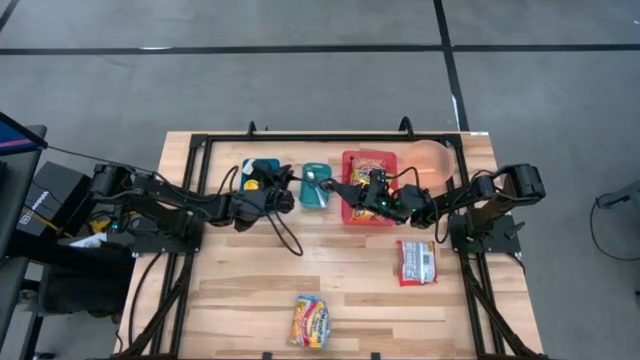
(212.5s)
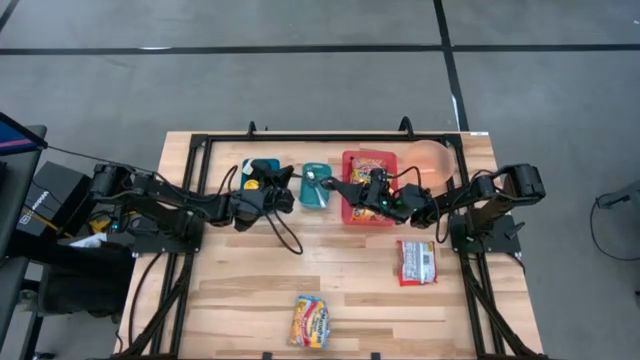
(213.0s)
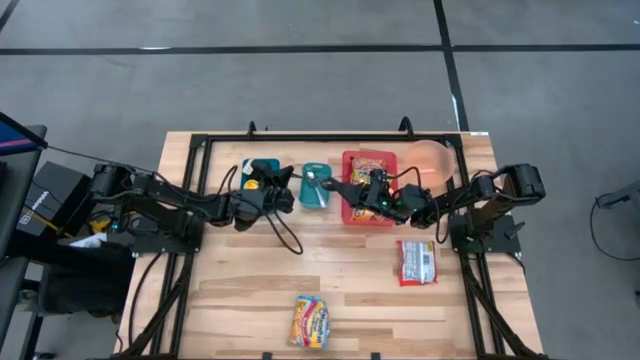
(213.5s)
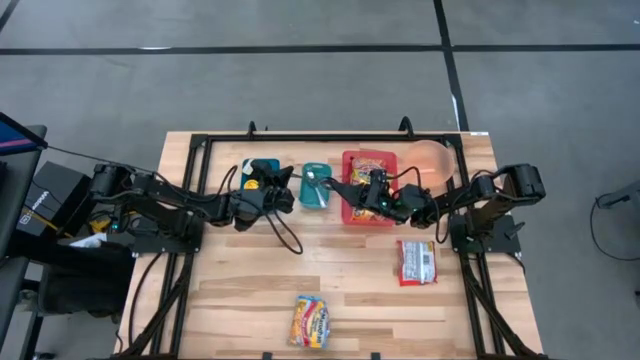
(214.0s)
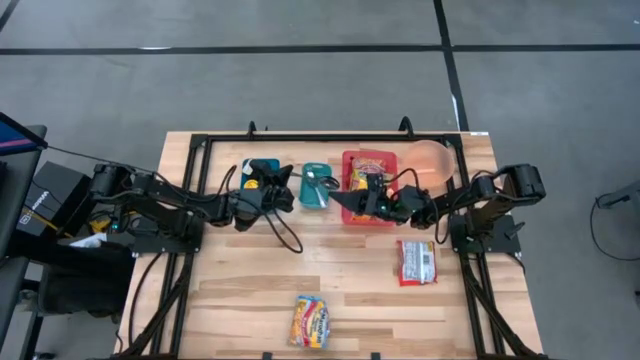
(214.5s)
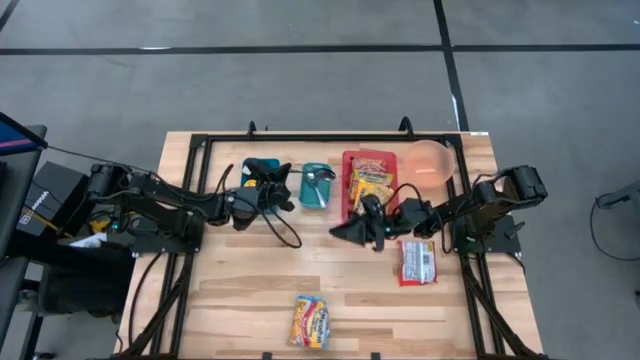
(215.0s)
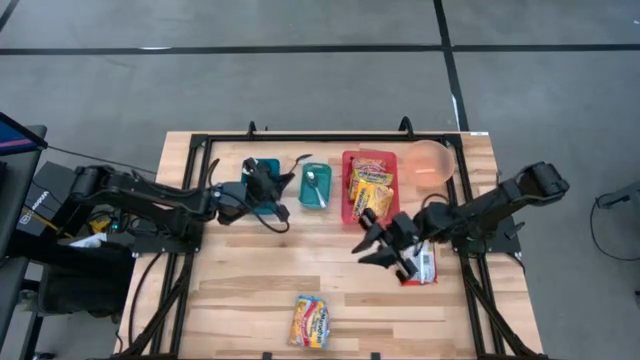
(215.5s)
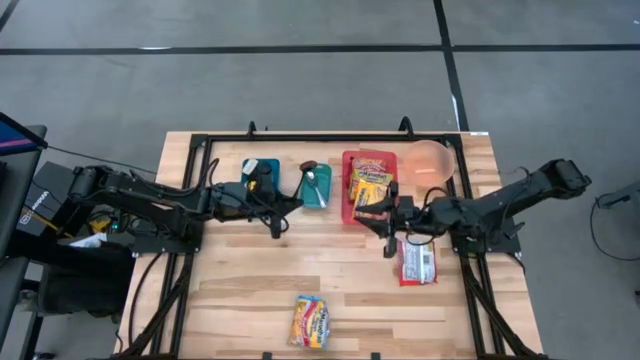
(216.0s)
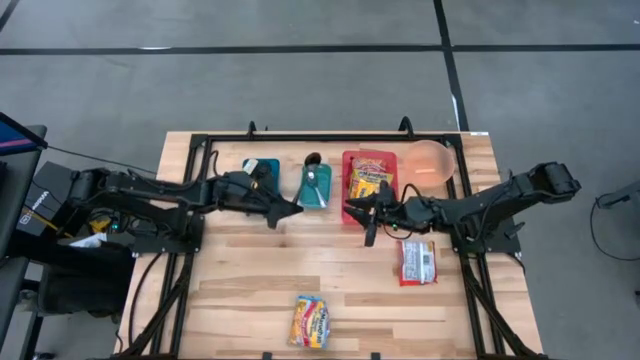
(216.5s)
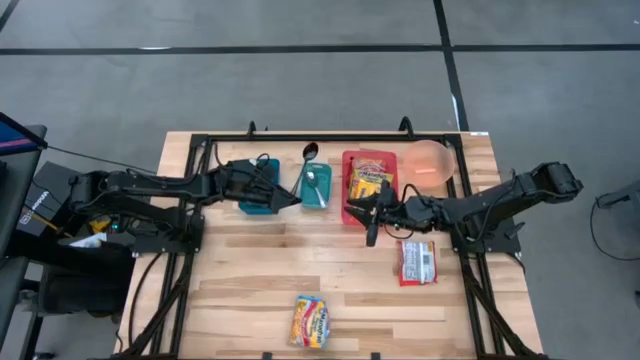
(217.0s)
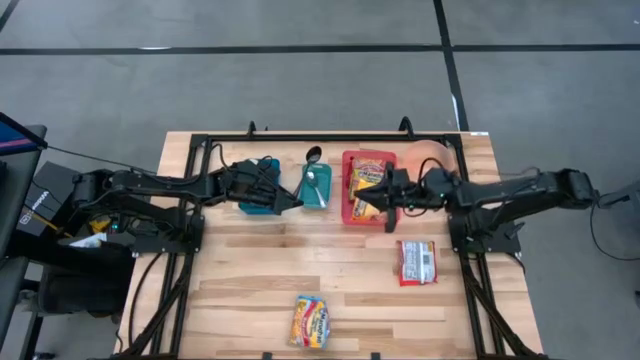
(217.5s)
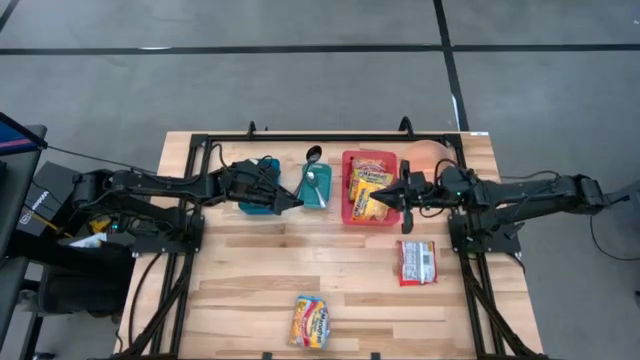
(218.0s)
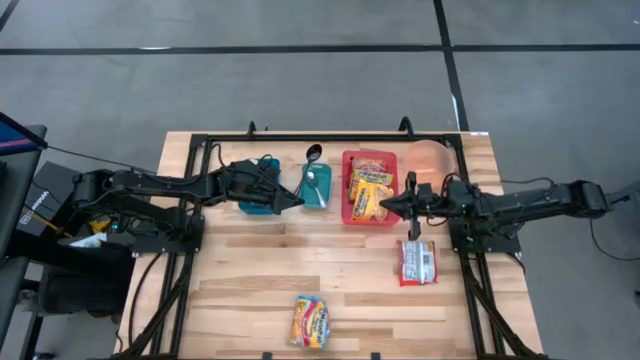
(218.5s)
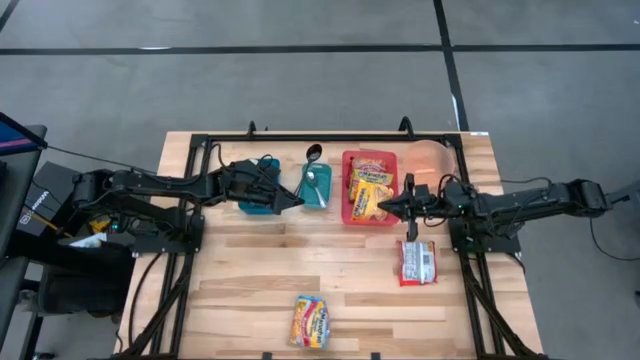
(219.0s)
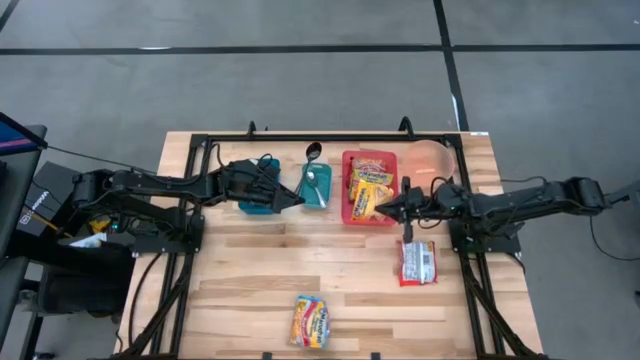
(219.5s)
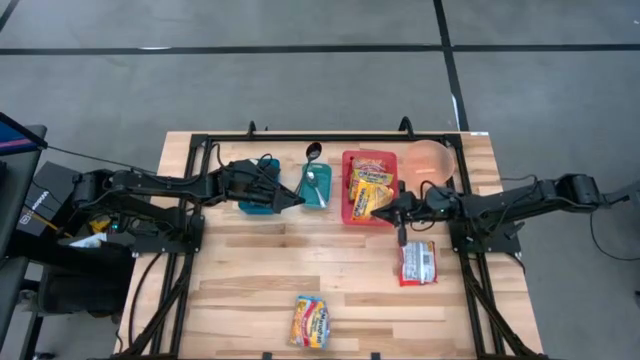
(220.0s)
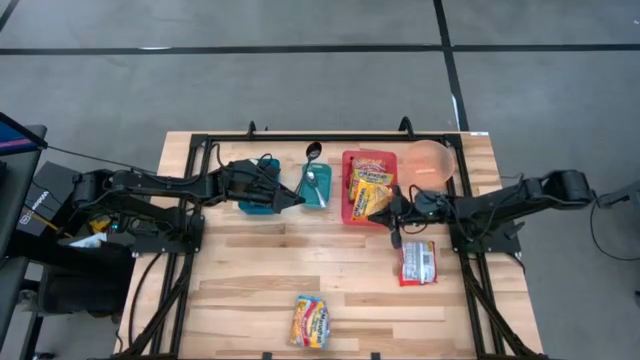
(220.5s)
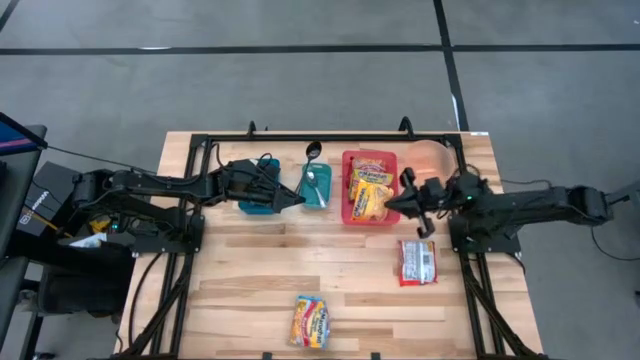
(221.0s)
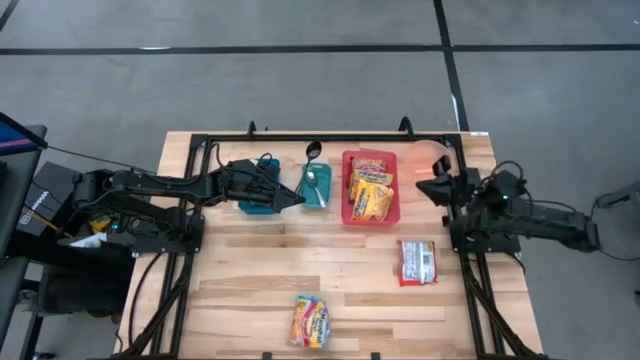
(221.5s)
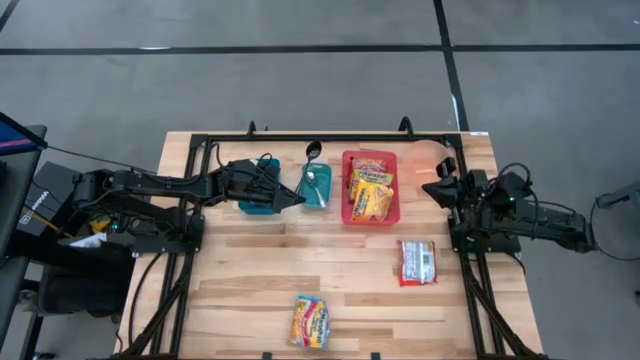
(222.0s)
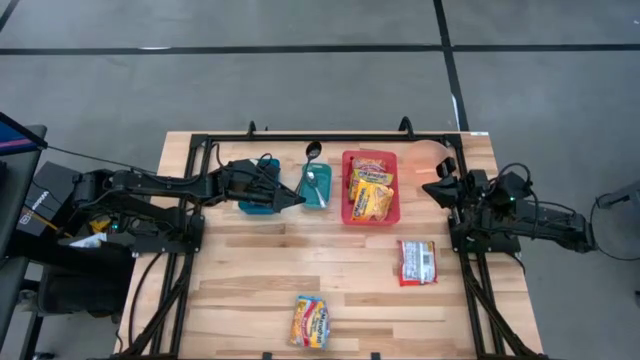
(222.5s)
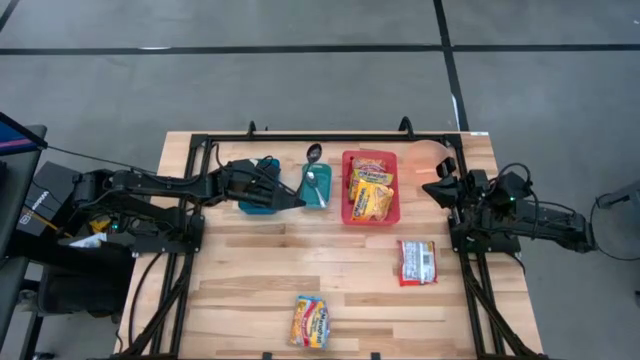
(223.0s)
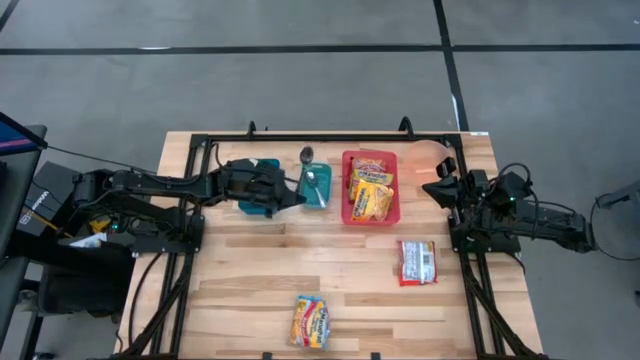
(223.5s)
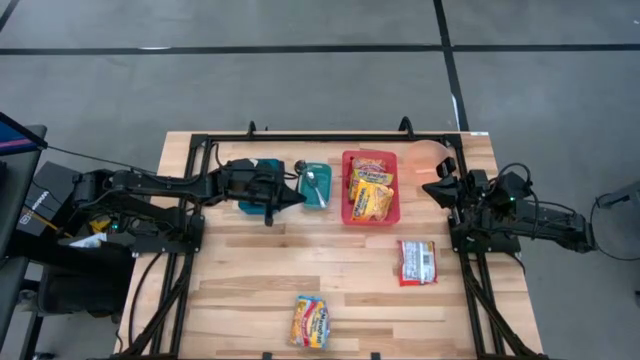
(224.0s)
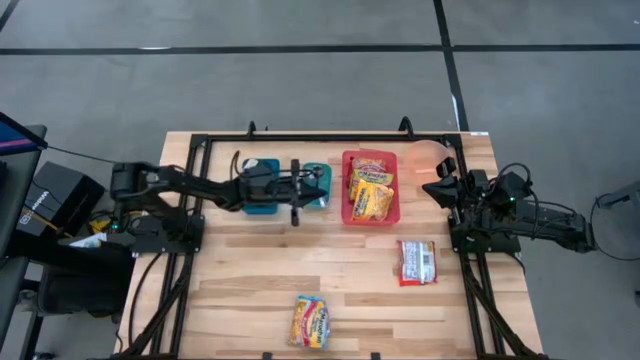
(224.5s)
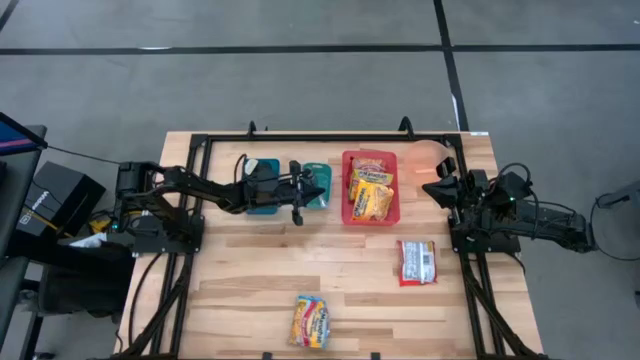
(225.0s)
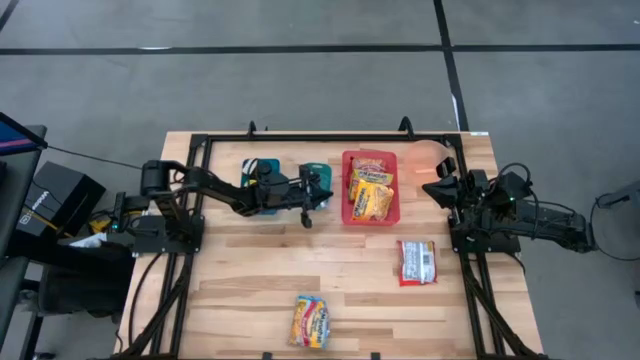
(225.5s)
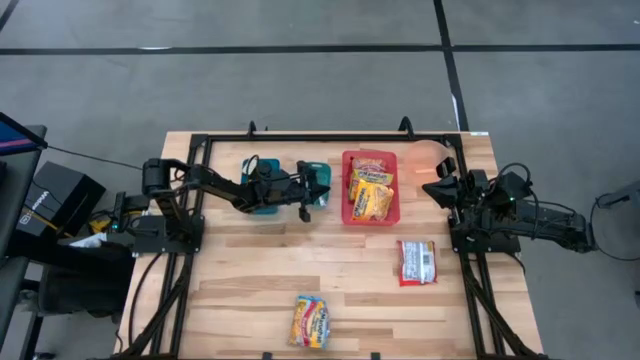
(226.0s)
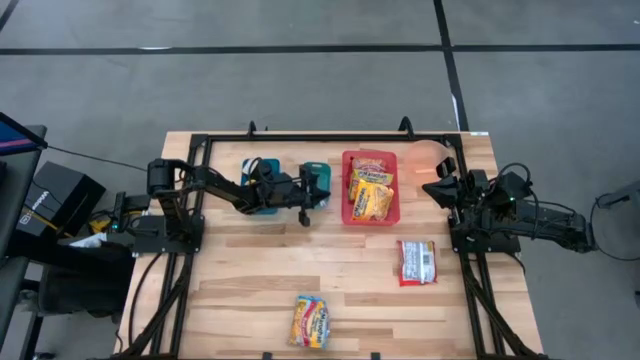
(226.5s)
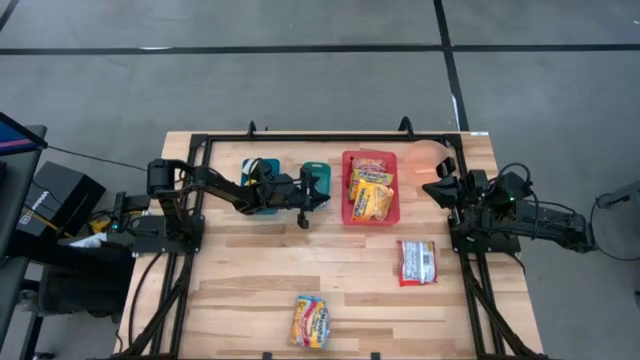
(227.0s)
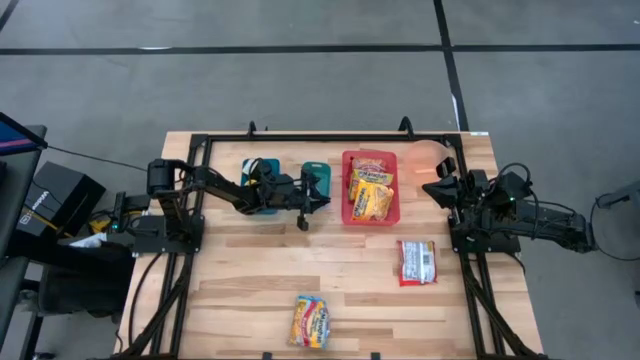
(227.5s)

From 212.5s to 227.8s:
Task: Pick & Place Food Item
Put the black spoon into the green bin

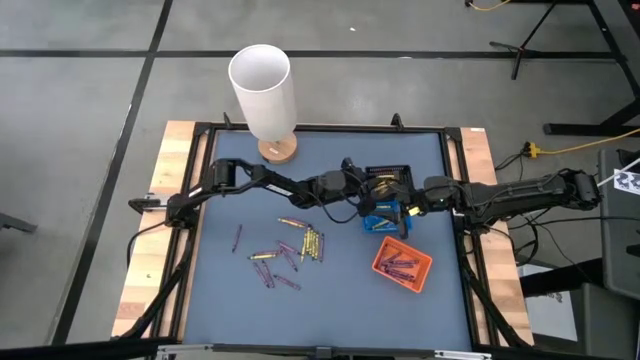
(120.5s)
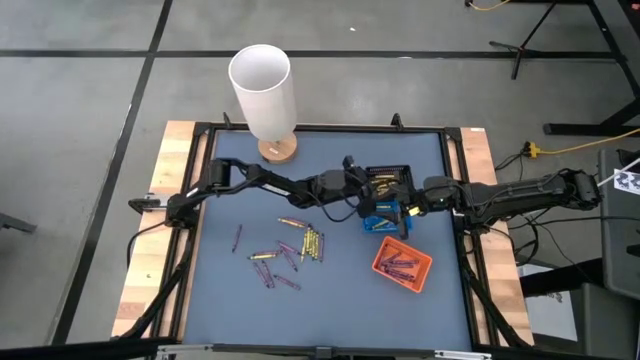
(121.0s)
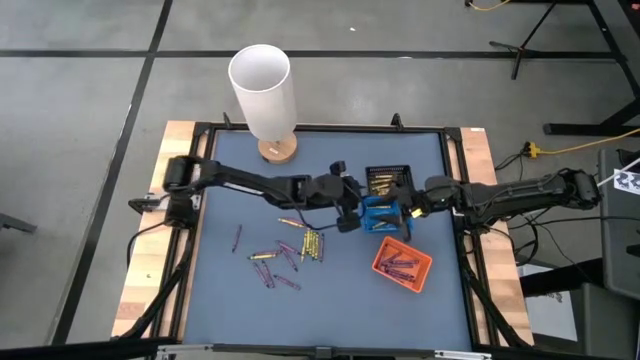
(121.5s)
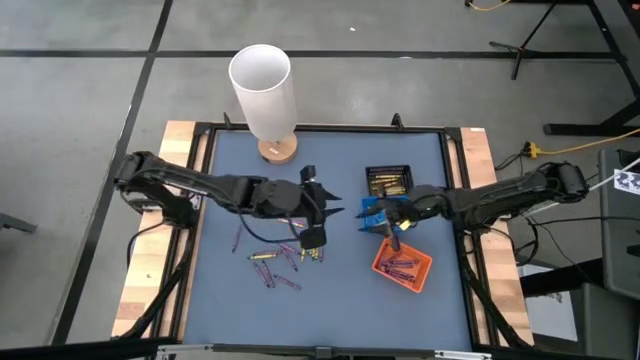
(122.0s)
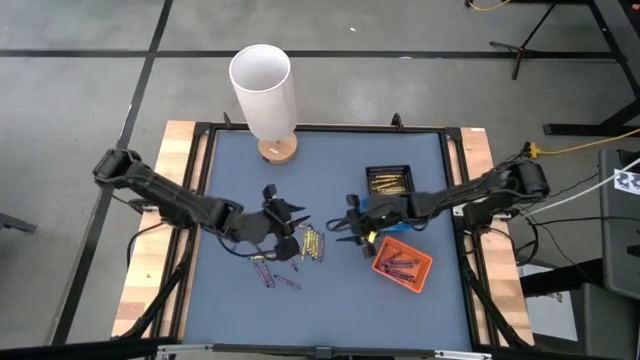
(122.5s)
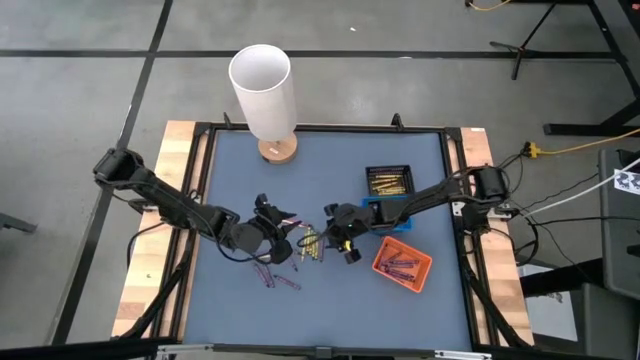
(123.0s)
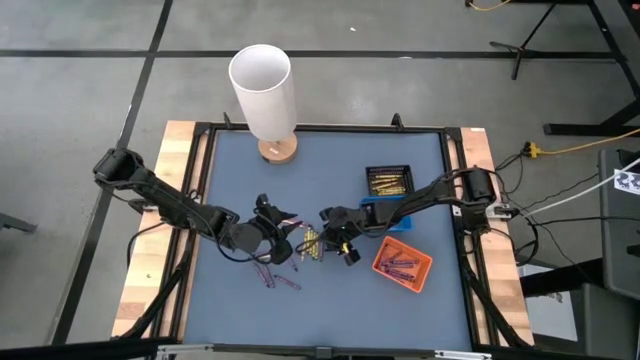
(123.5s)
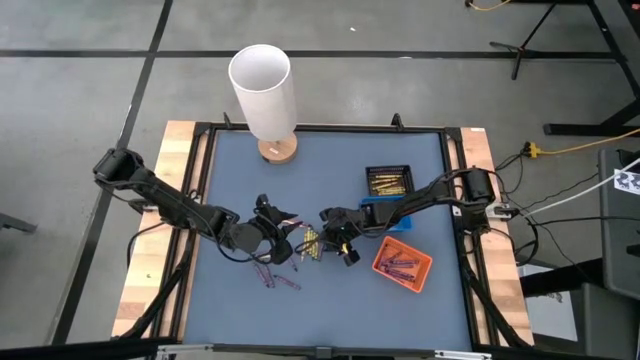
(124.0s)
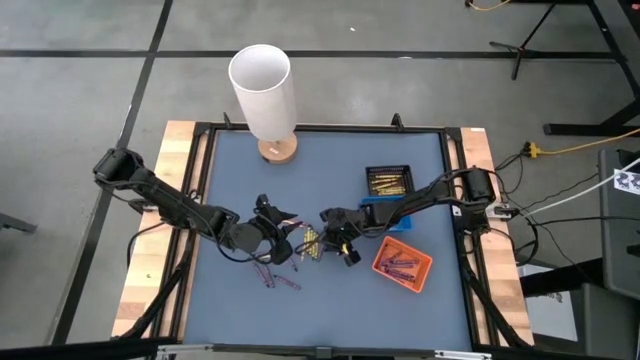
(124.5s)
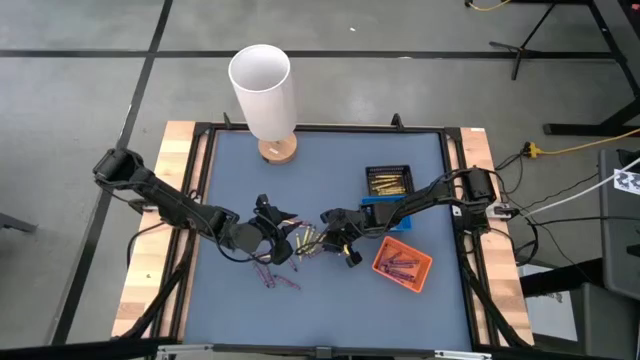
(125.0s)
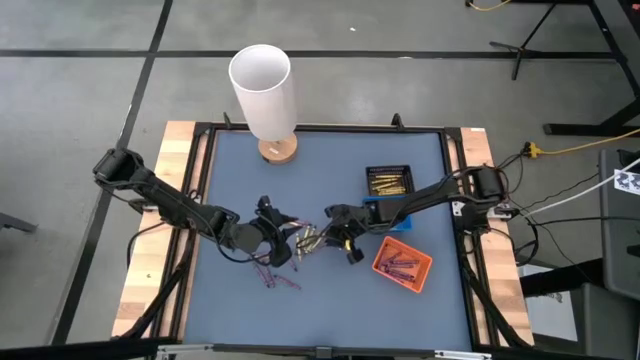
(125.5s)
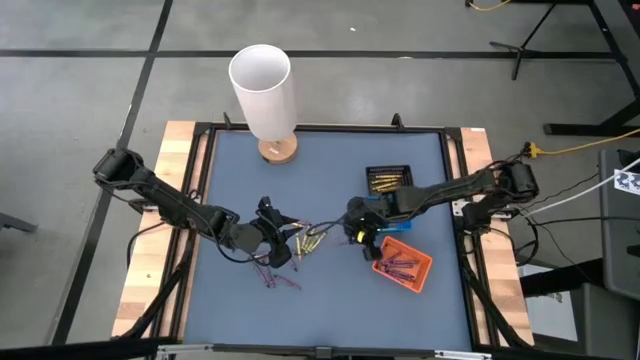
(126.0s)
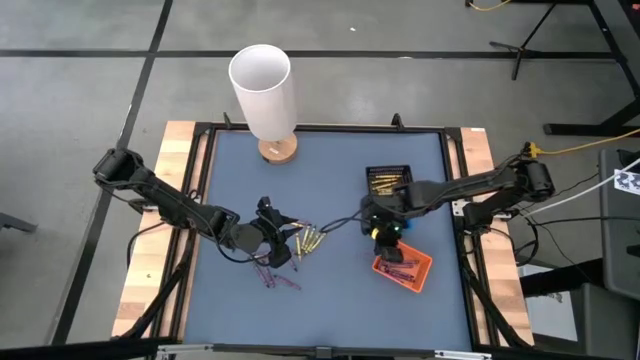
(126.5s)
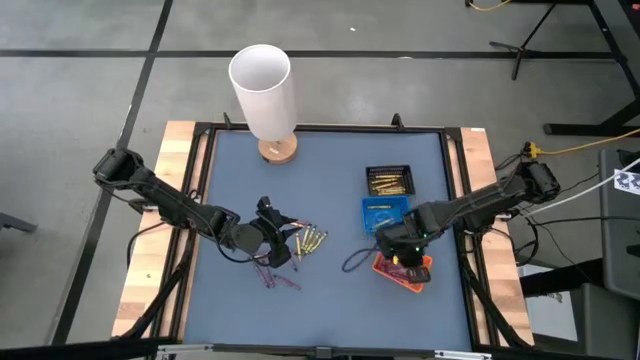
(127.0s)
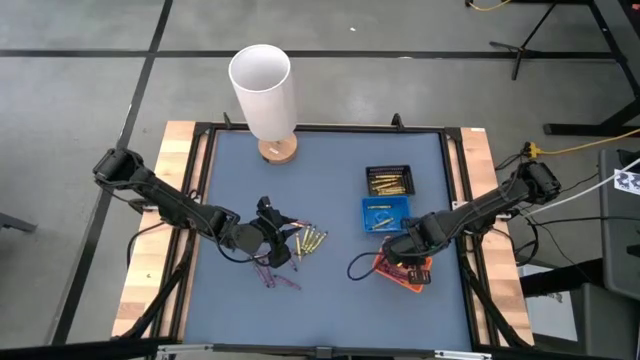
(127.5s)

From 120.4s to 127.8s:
Task: Sort crayons
Put the purple crayon into the orange bin
